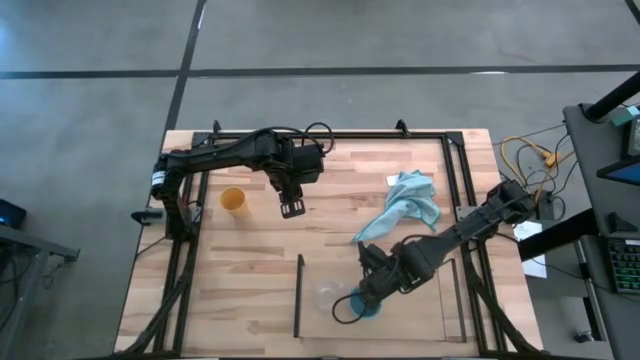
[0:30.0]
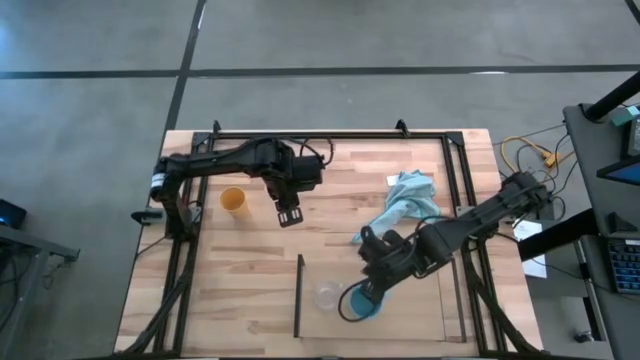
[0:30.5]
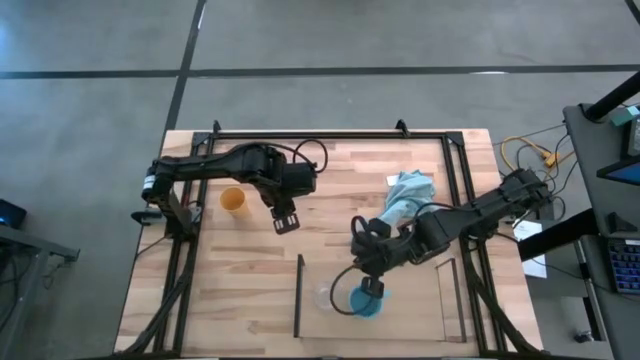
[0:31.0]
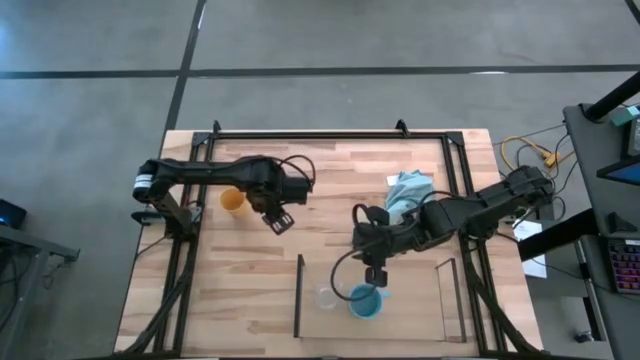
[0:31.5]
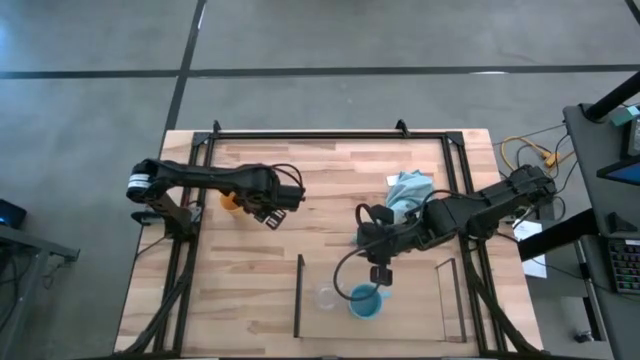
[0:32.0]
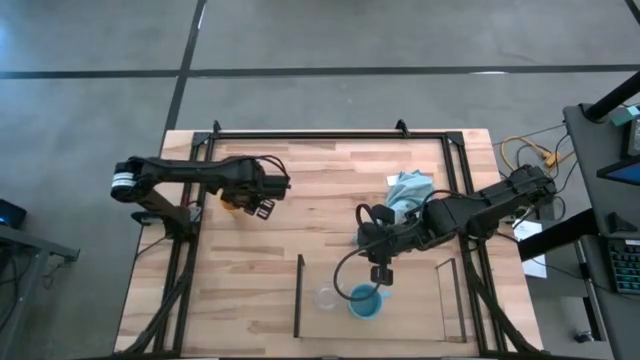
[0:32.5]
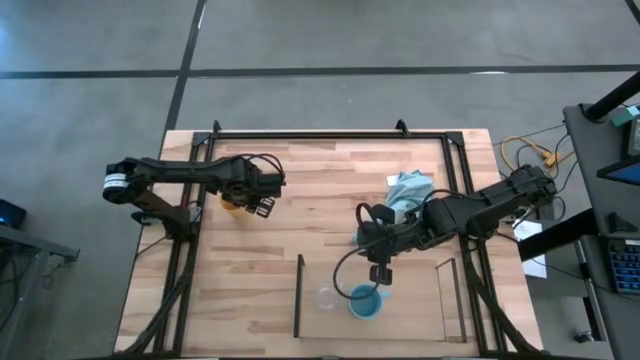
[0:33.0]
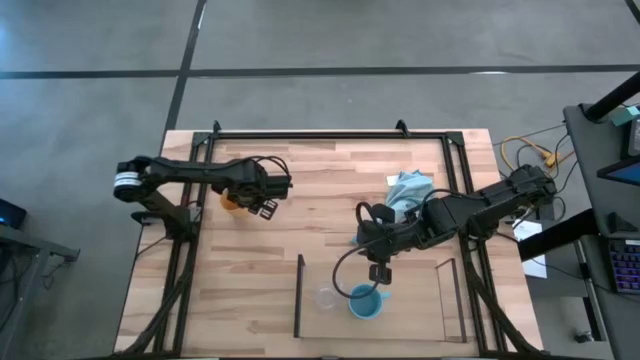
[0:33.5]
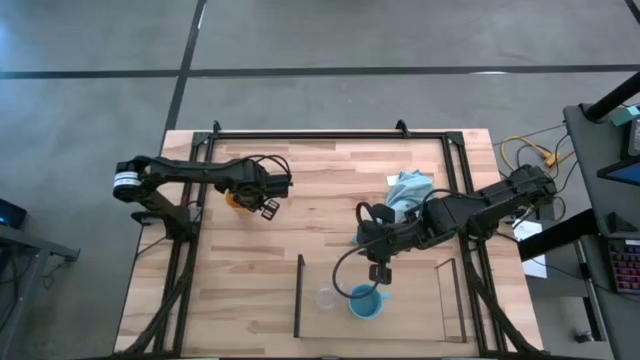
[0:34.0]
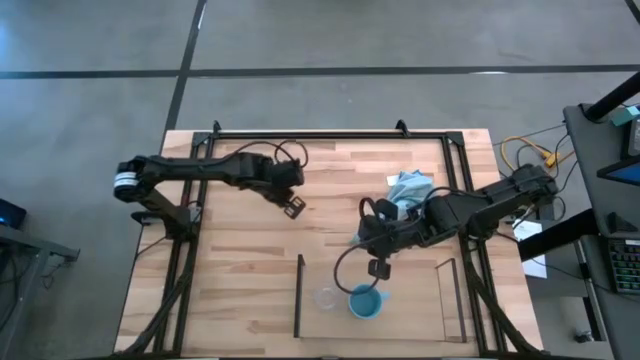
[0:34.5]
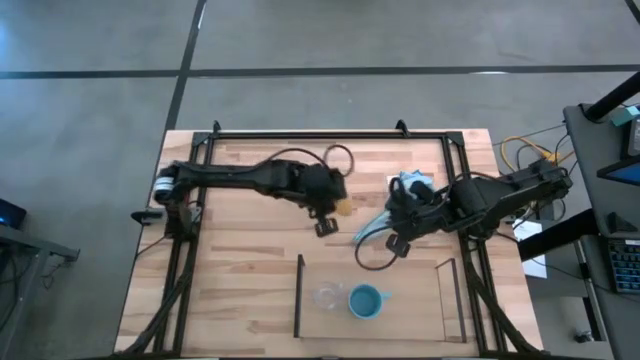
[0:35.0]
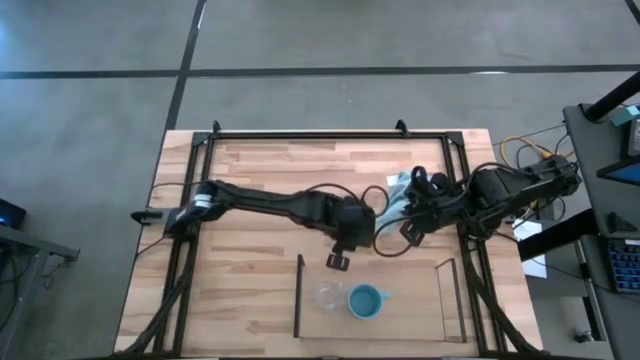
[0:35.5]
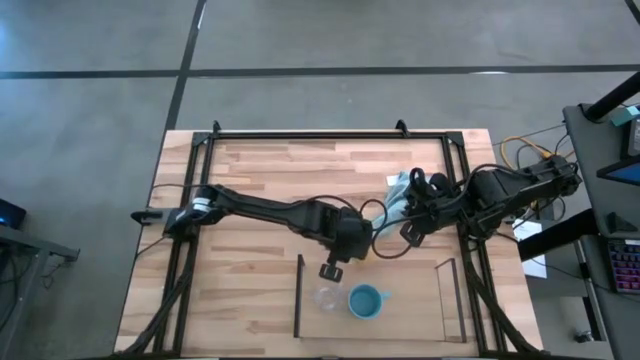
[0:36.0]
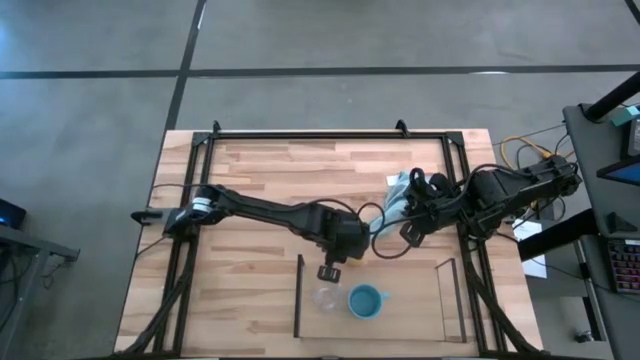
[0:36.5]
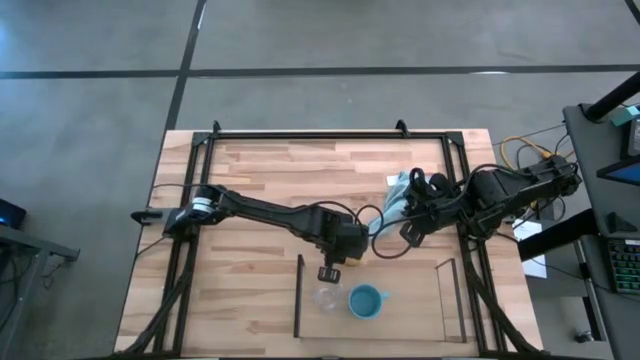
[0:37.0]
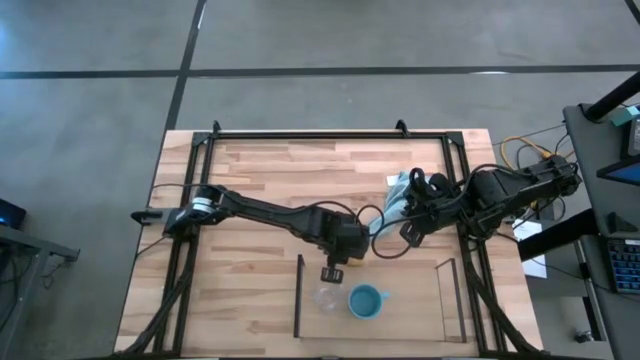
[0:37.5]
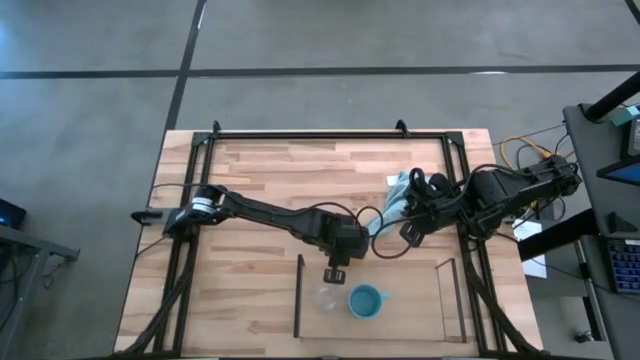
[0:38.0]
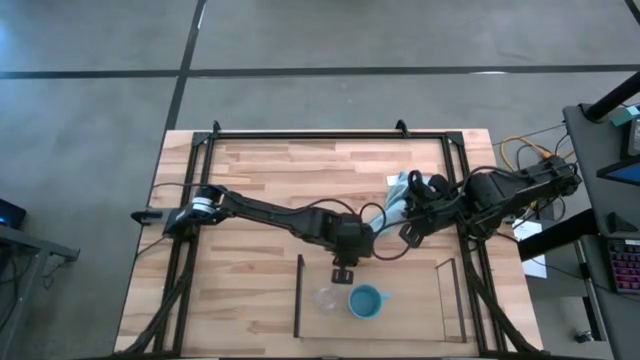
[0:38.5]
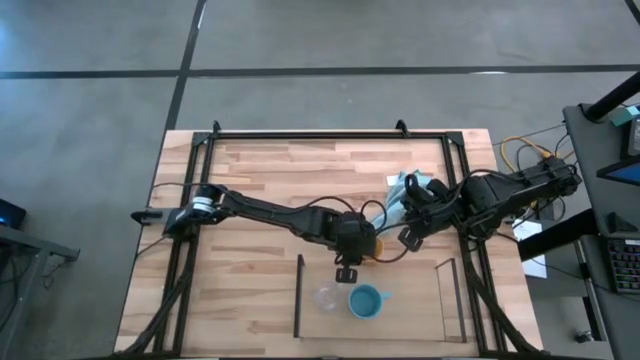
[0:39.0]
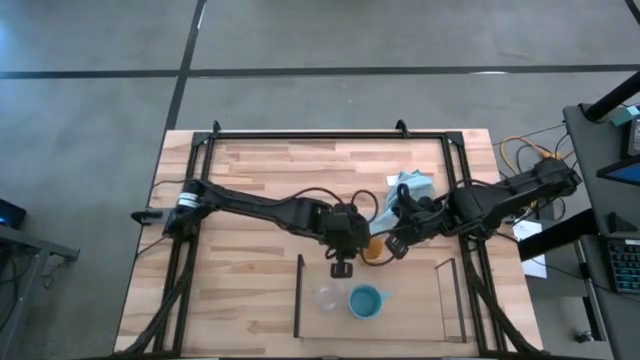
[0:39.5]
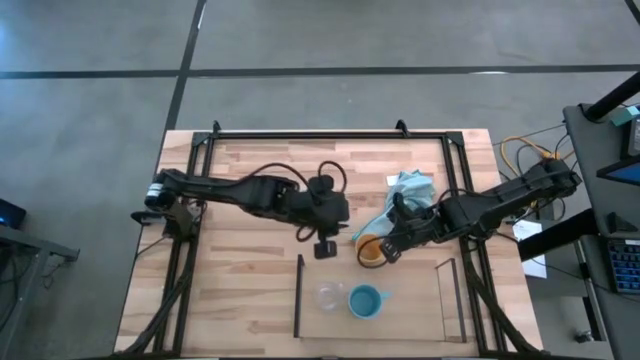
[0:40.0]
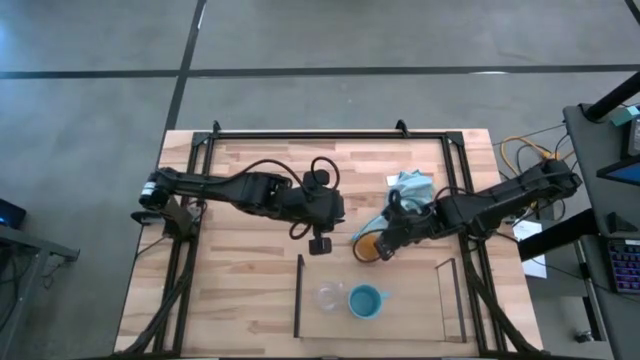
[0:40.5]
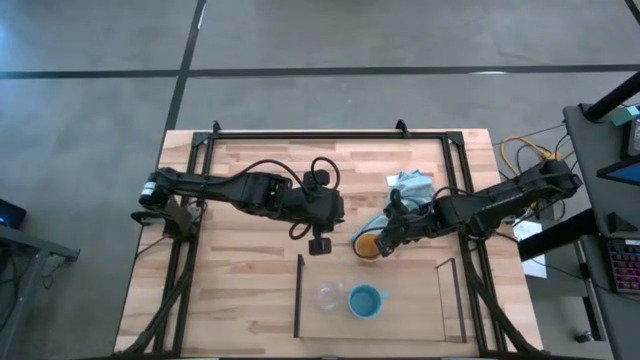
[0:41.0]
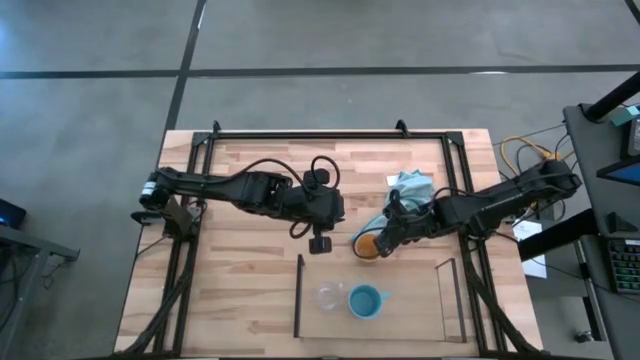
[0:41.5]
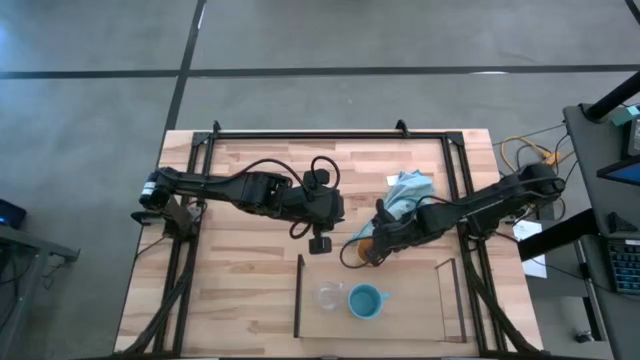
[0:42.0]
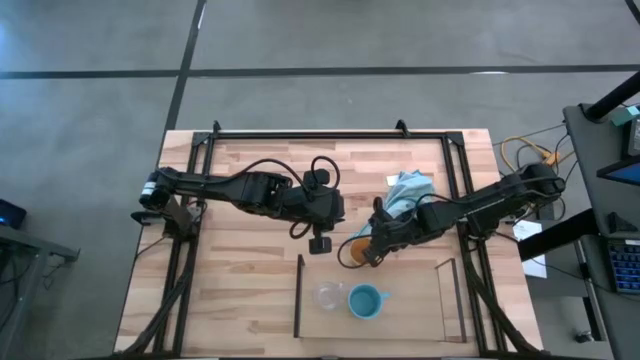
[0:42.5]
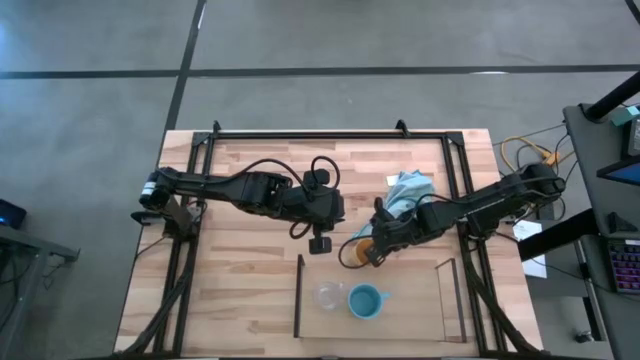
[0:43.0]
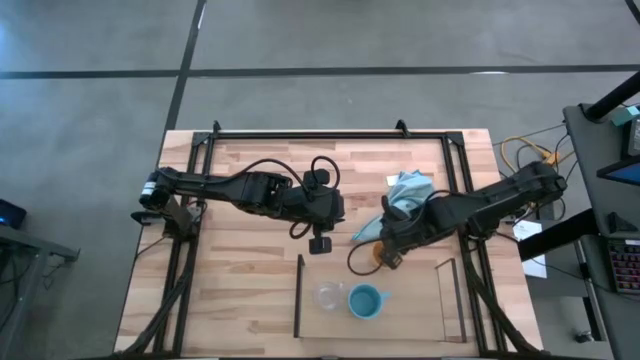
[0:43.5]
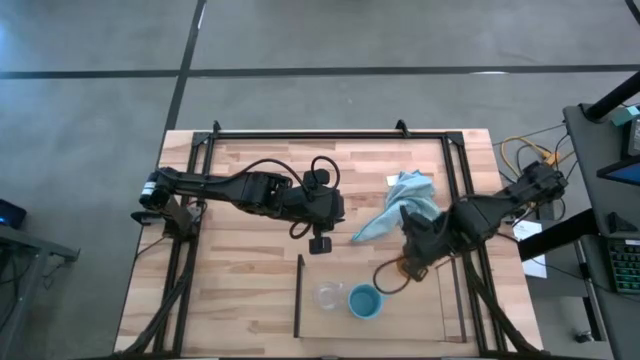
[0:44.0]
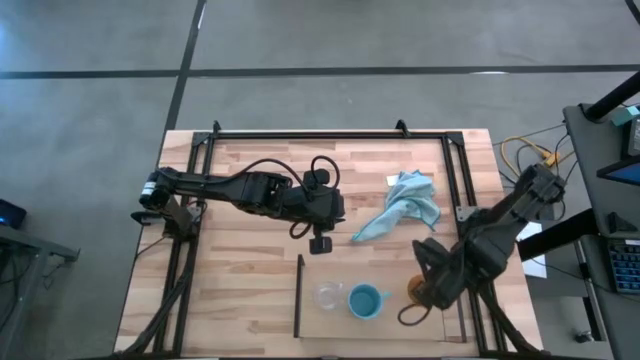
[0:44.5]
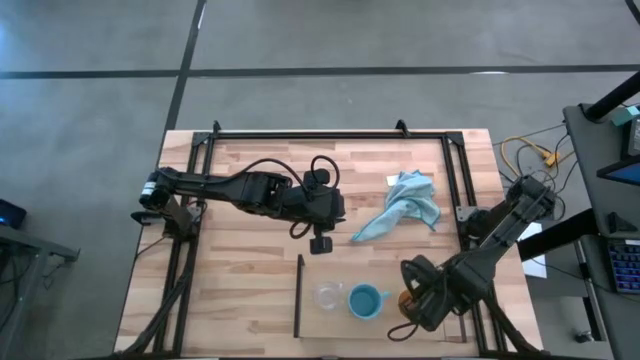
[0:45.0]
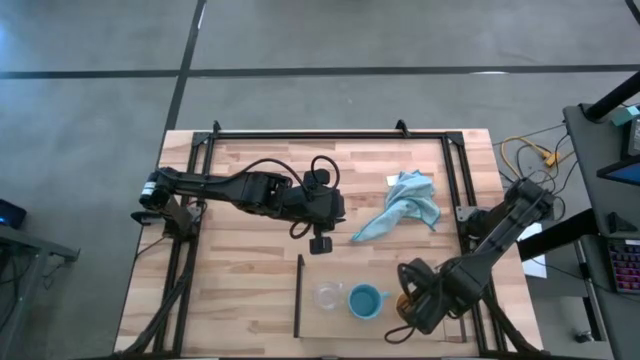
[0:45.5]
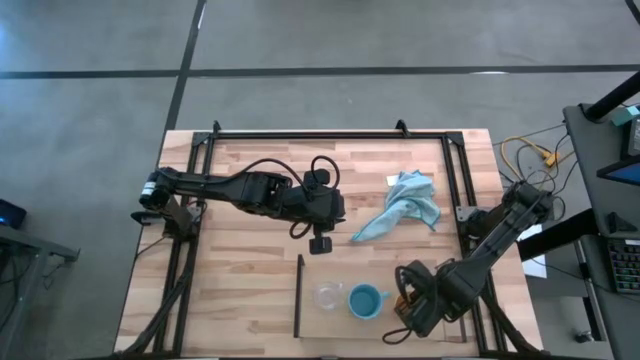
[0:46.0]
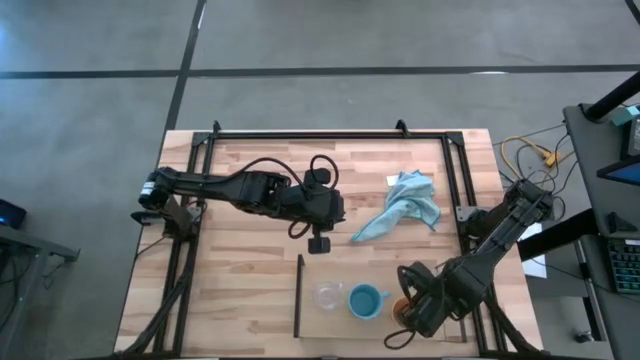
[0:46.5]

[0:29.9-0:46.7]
Task: Stack small to large cups/mugs on shelf
Put the yellow cup on the shelf

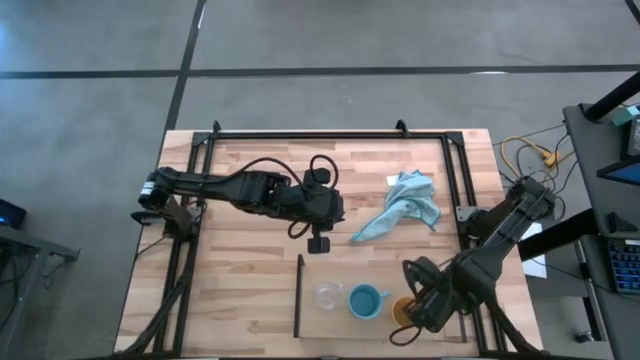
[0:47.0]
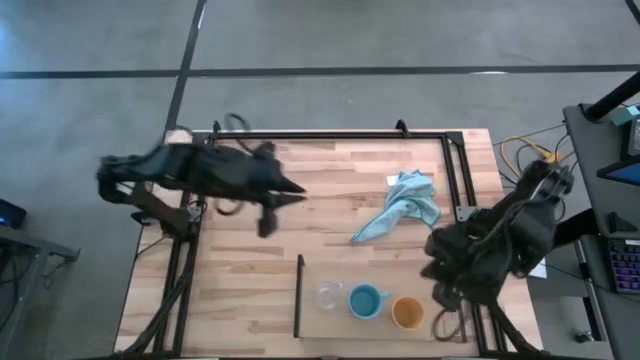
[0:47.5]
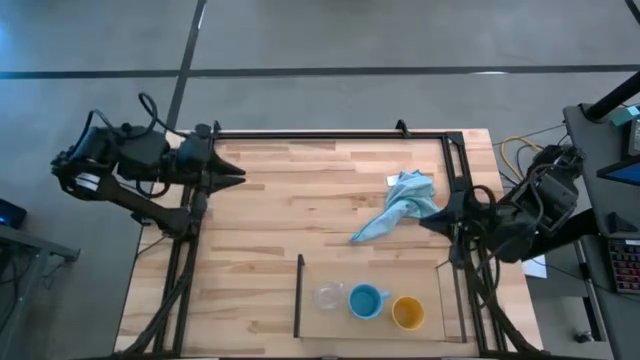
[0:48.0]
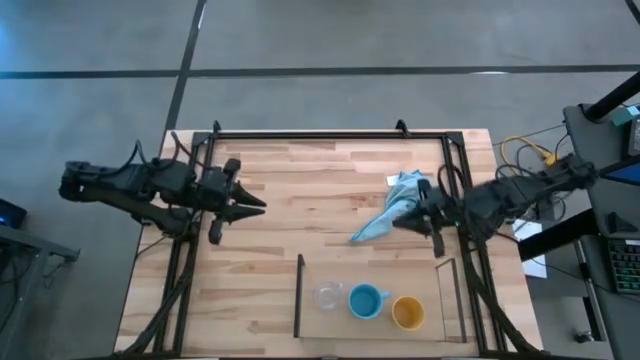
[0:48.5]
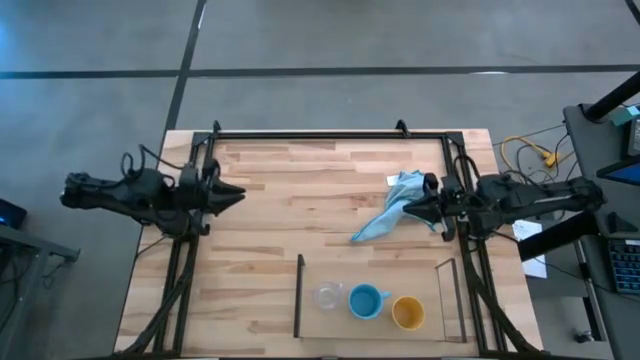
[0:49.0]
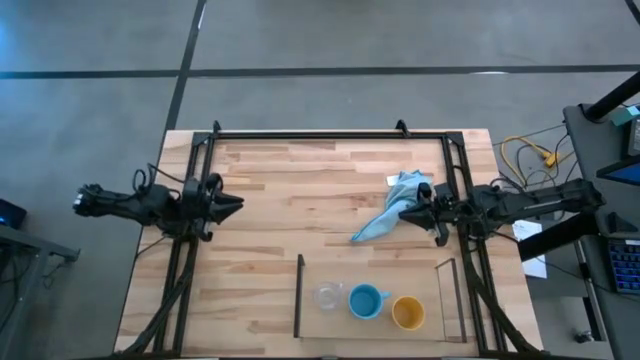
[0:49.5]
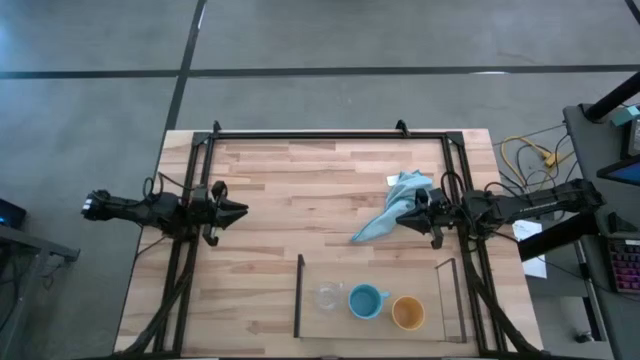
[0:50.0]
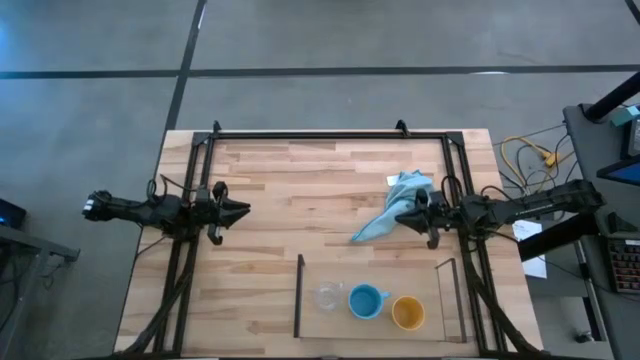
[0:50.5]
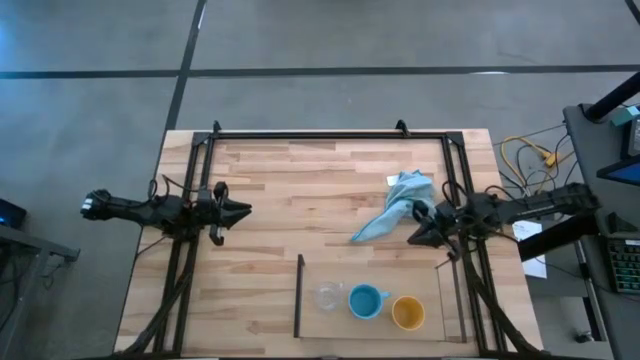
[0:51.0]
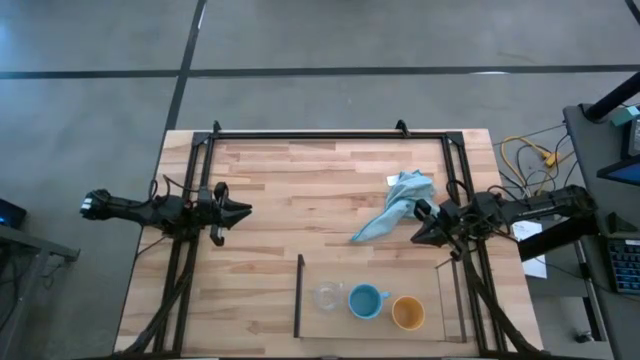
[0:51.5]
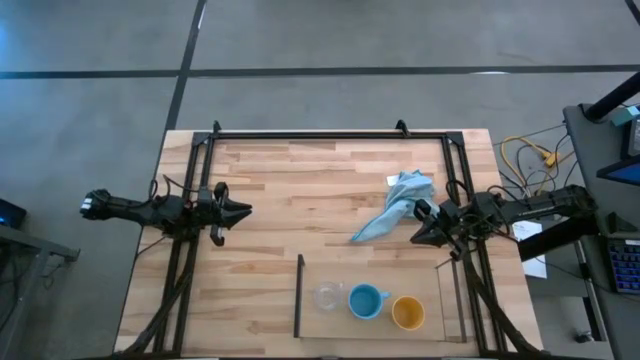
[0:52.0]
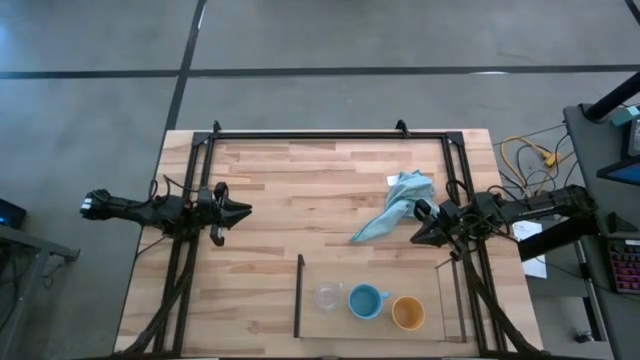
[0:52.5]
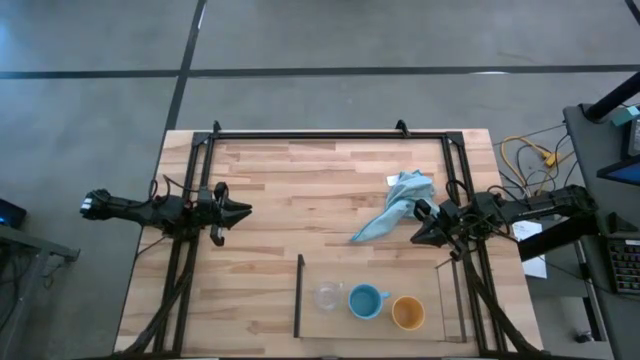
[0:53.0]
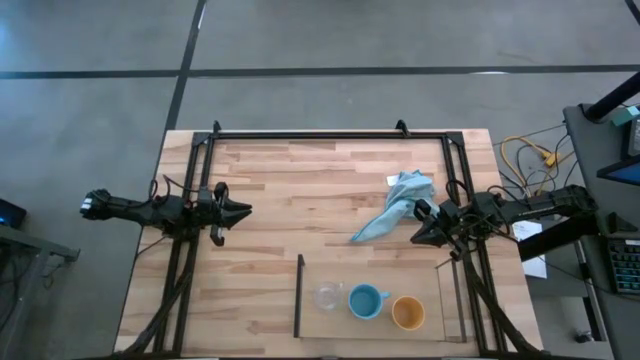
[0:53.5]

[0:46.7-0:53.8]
Return to Home Position
